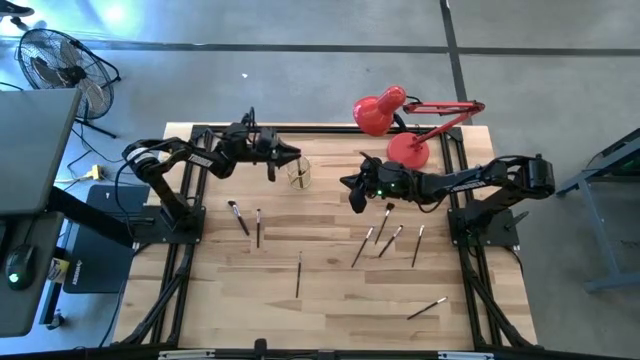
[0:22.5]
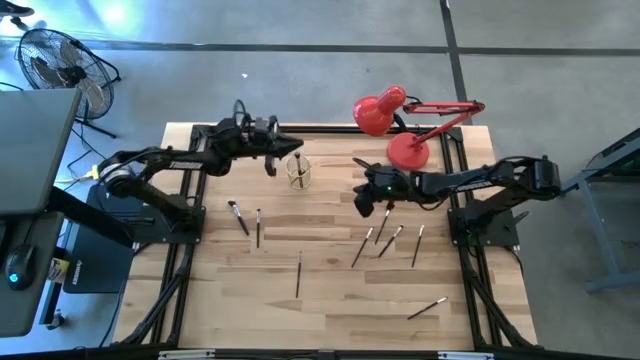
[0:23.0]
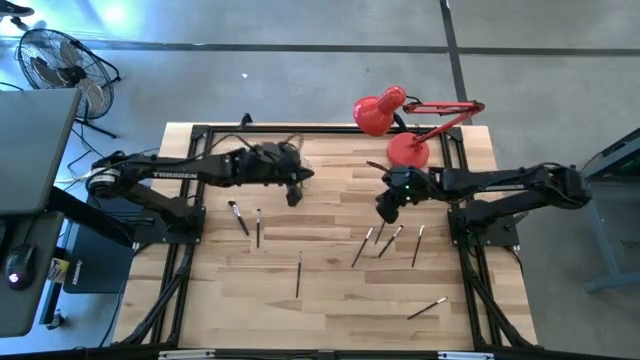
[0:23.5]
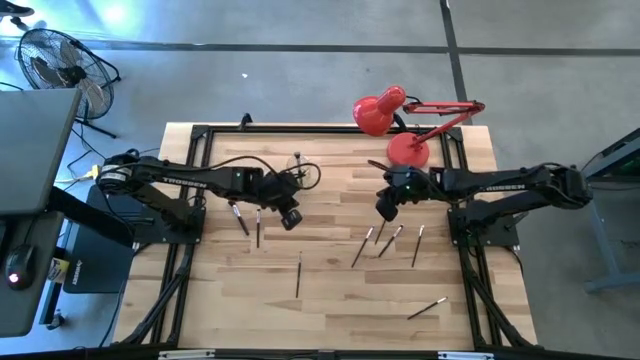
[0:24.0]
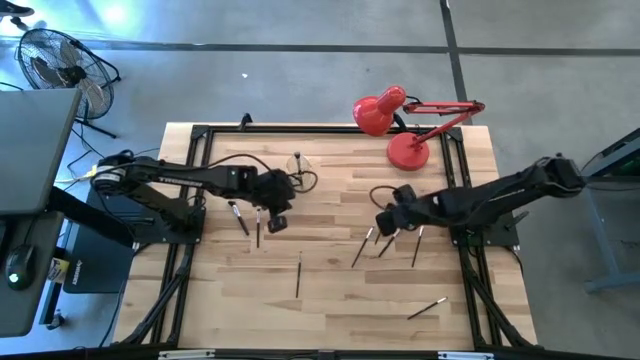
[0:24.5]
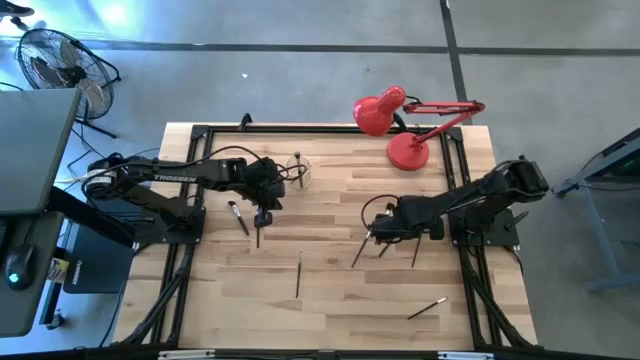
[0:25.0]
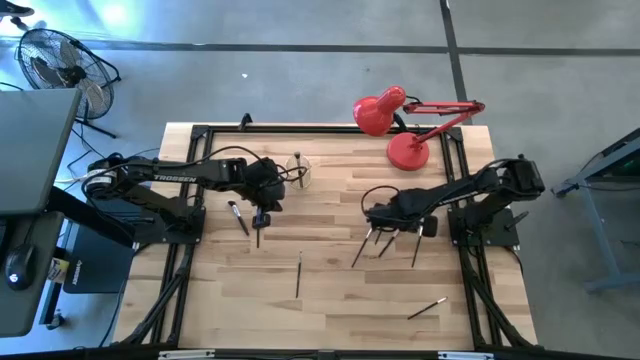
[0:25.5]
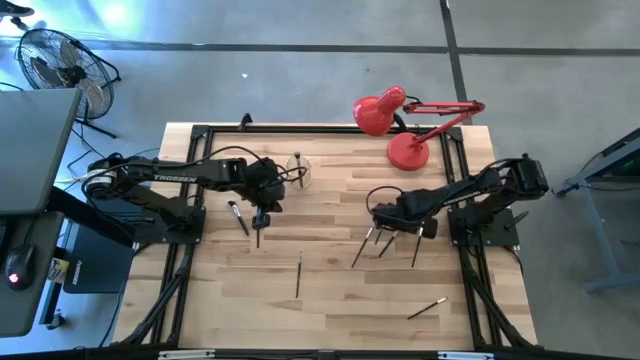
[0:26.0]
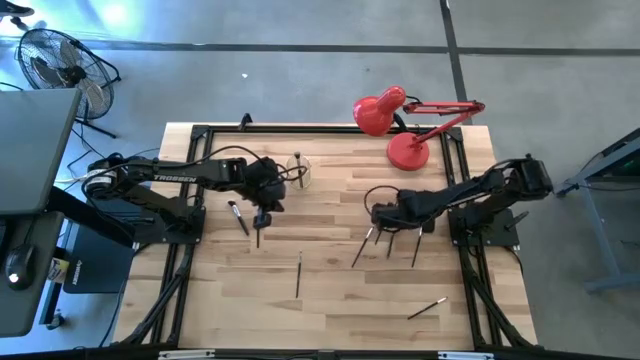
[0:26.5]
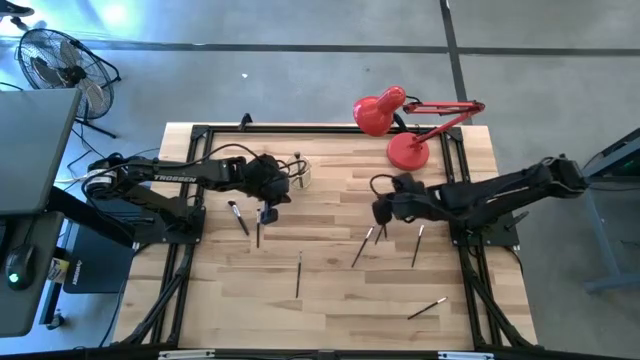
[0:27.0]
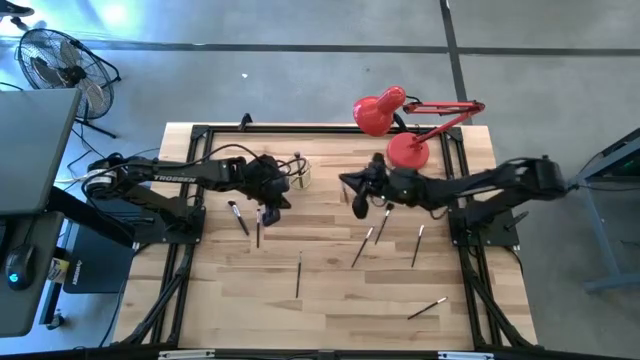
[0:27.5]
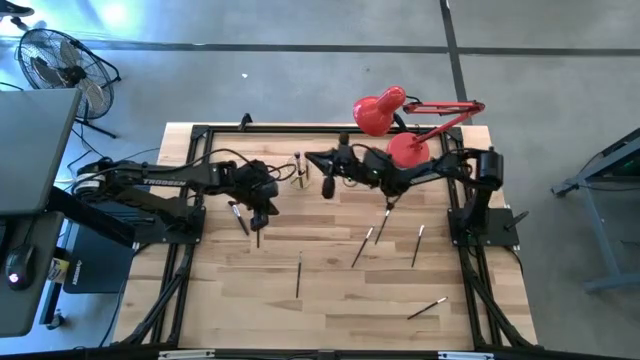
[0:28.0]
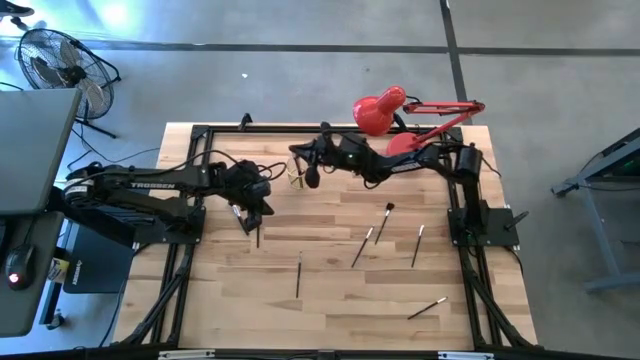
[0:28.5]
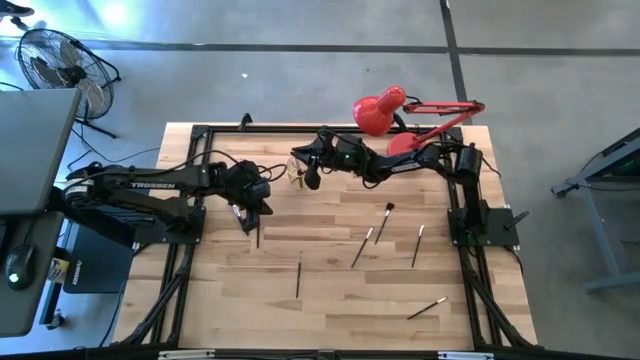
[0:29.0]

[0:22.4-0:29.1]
Task: Put items in baskets/containers
Put the eyeshadow brush into the wire organizer

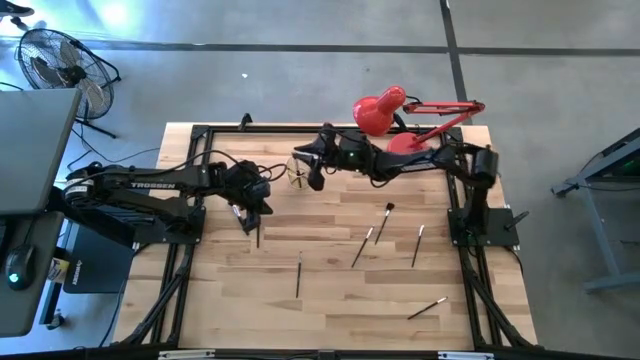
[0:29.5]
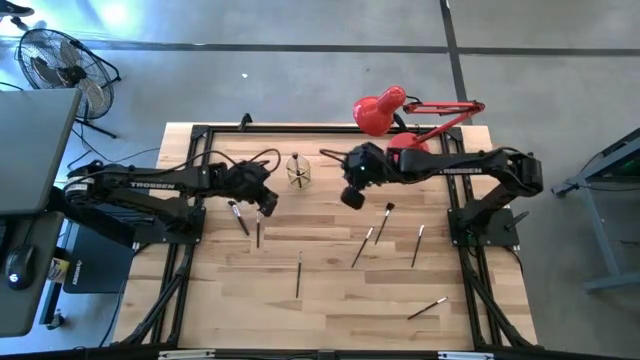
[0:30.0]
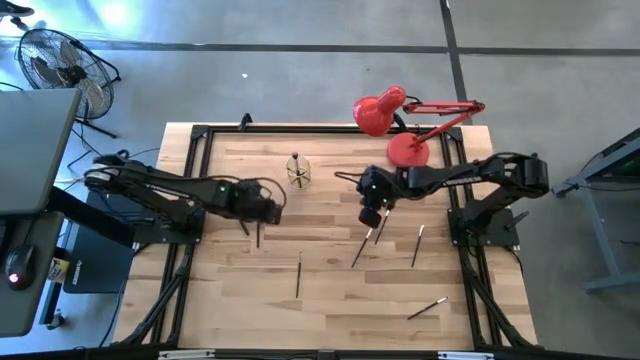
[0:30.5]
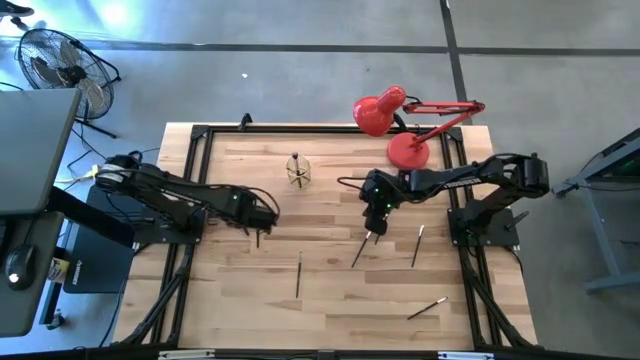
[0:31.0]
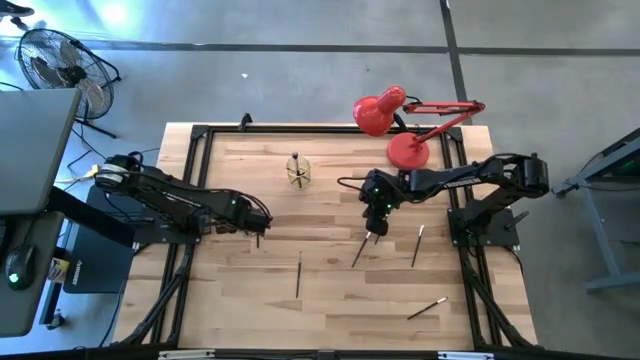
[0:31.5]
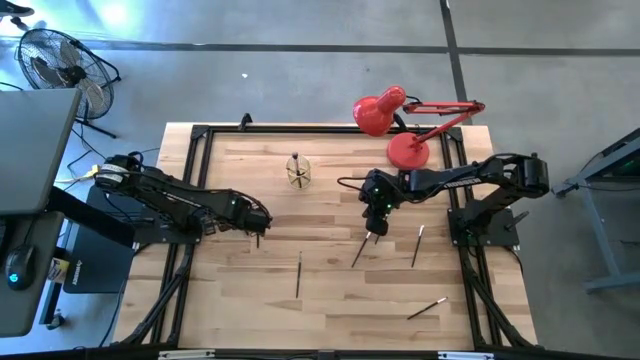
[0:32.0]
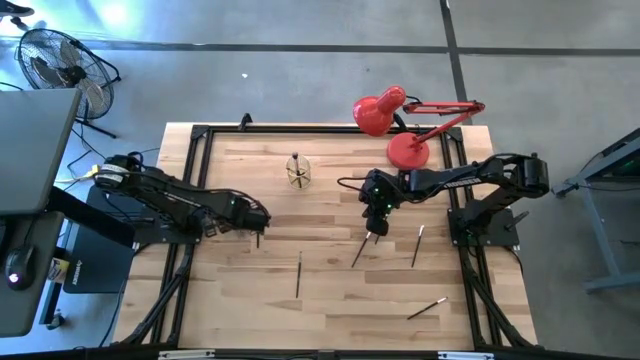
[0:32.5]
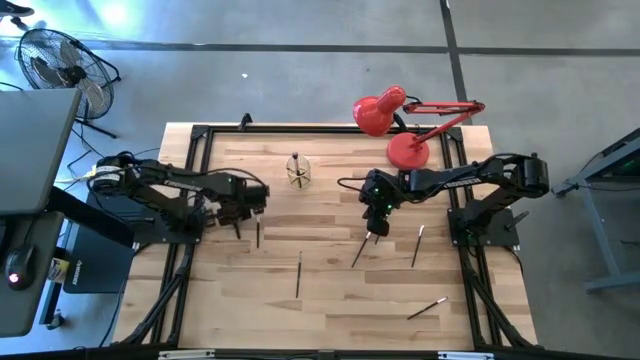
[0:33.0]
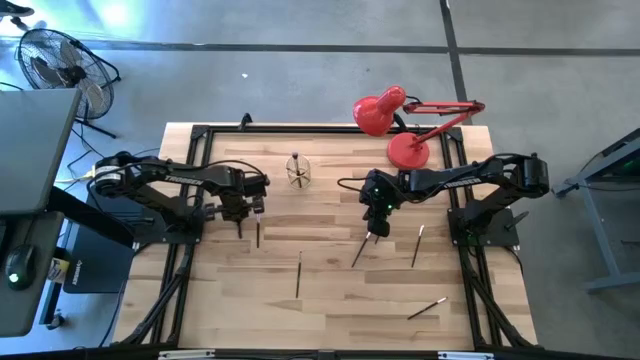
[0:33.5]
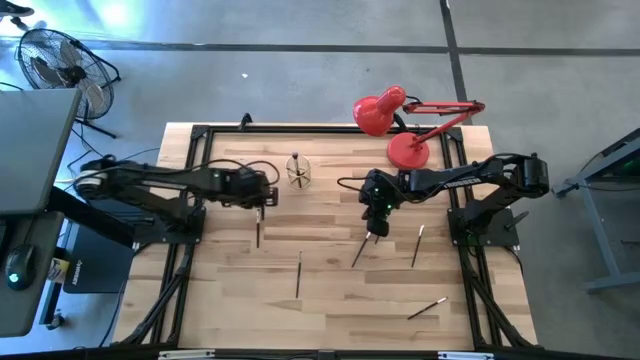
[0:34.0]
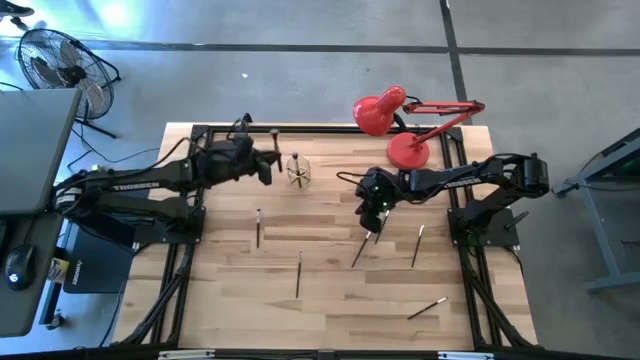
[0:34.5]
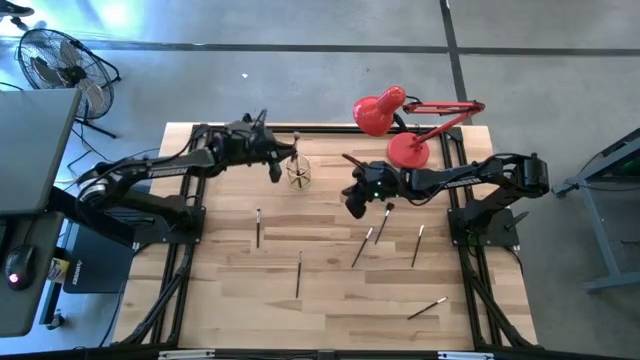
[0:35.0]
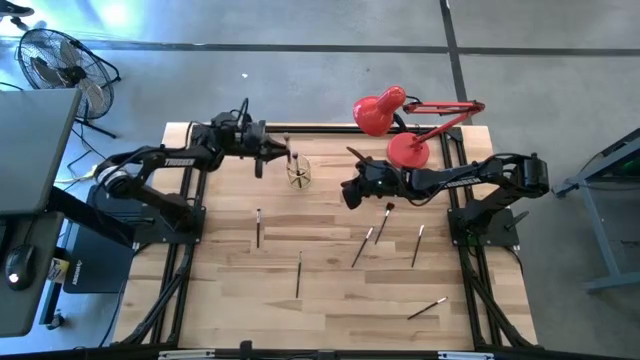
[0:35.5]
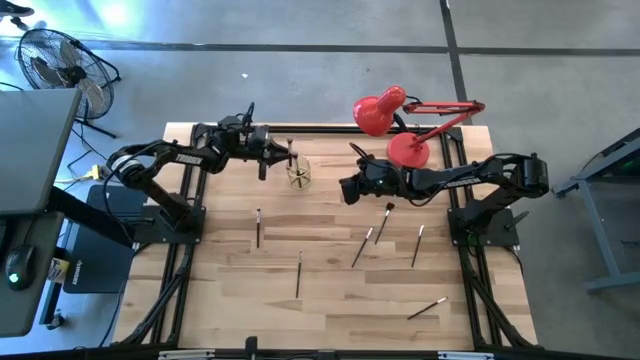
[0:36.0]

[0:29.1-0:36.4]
Put the powder brush into the wire organizer

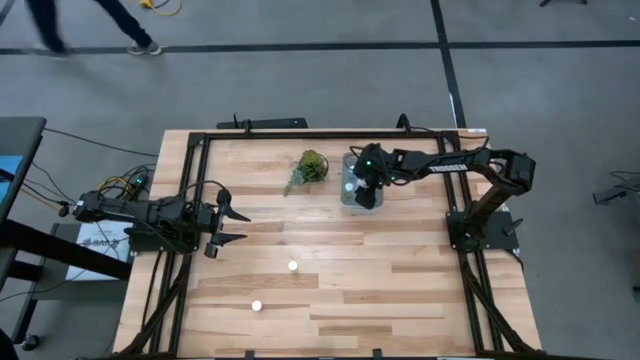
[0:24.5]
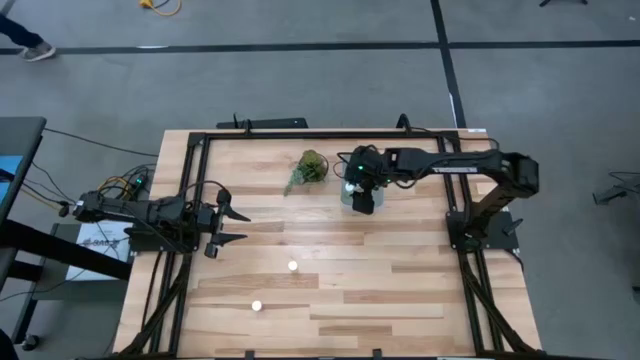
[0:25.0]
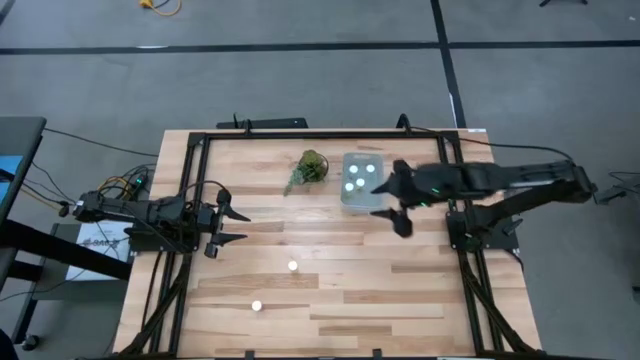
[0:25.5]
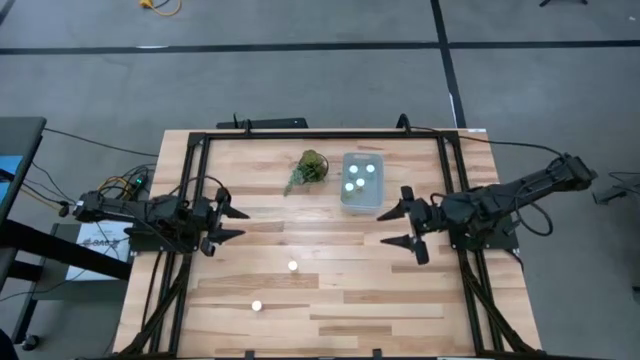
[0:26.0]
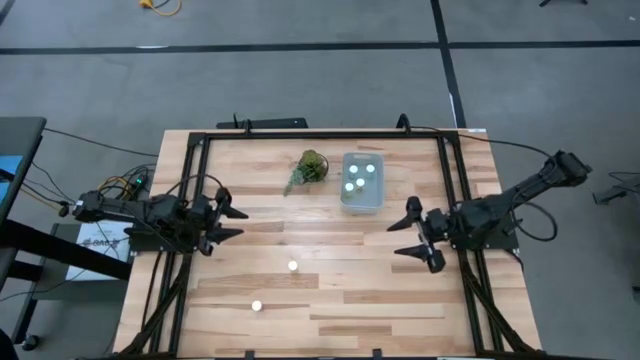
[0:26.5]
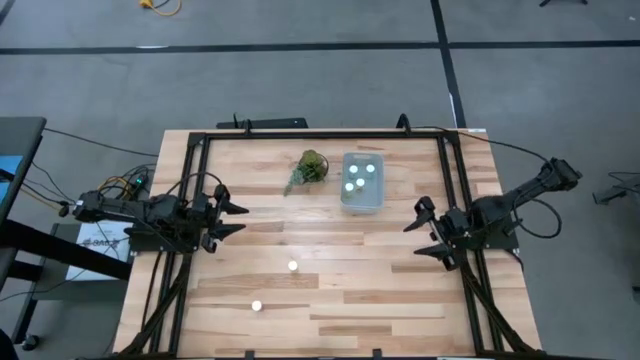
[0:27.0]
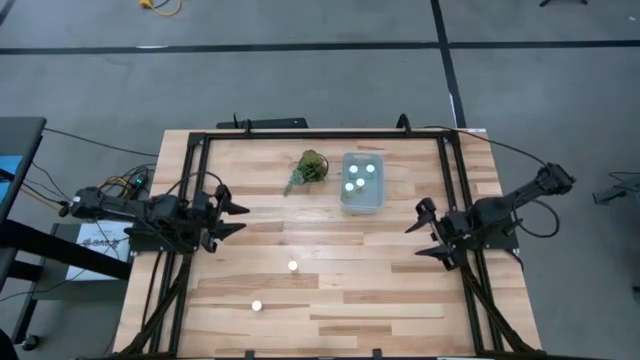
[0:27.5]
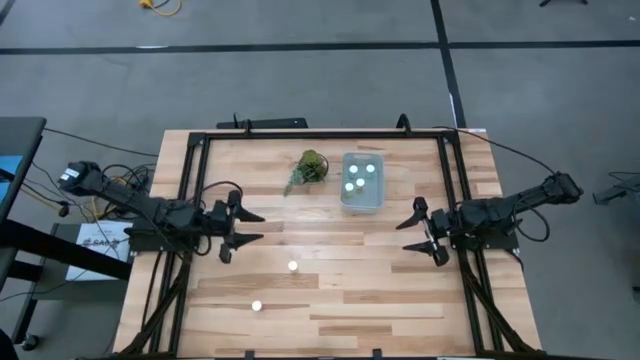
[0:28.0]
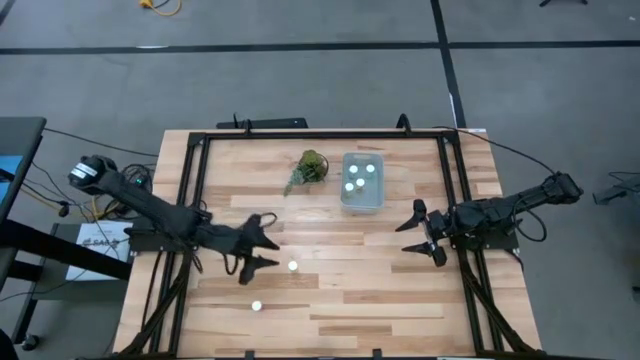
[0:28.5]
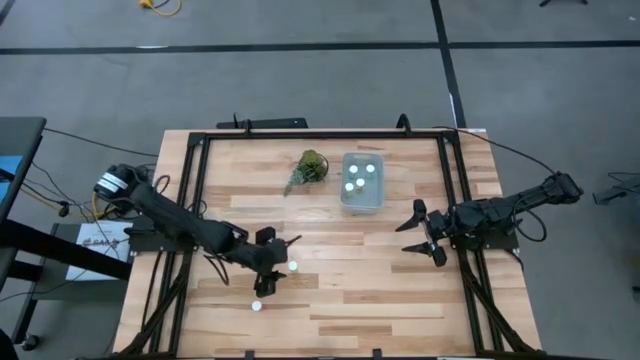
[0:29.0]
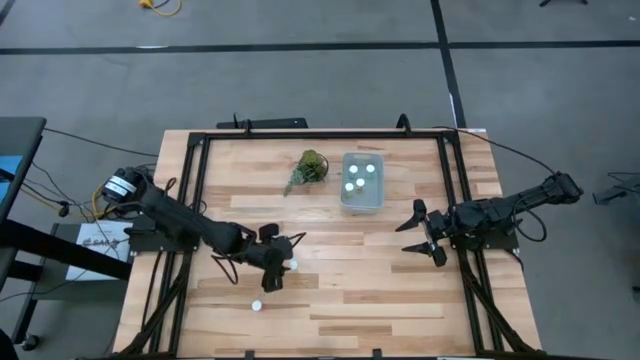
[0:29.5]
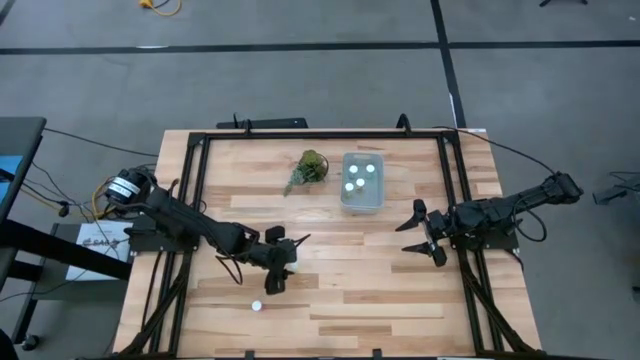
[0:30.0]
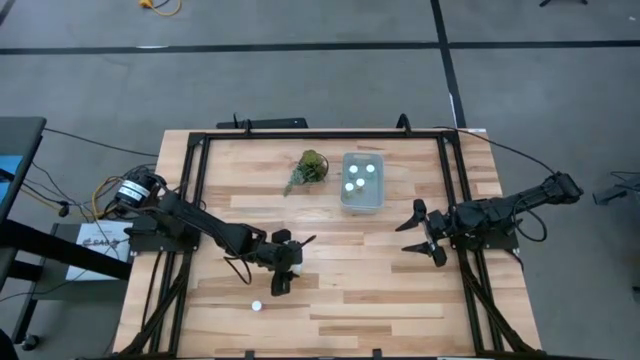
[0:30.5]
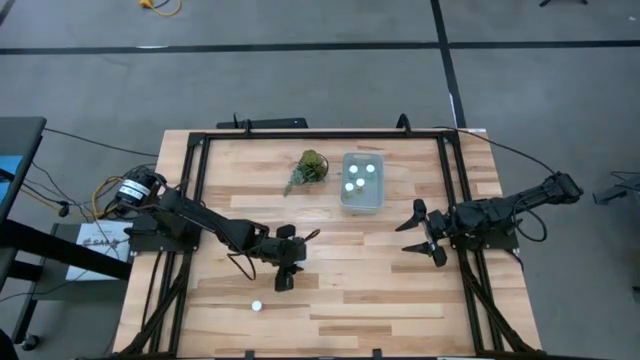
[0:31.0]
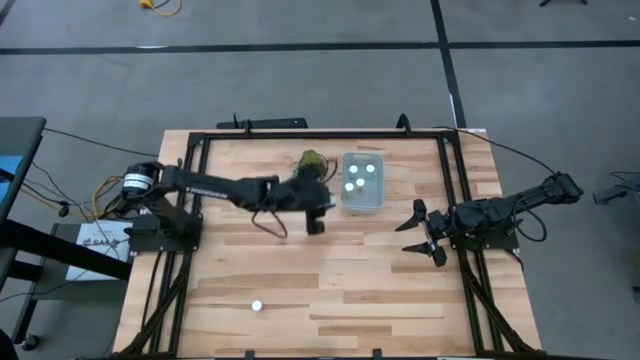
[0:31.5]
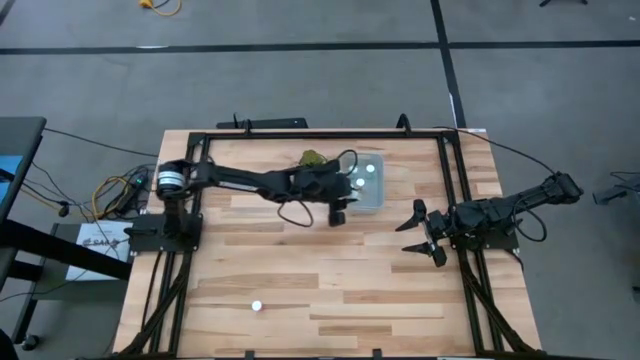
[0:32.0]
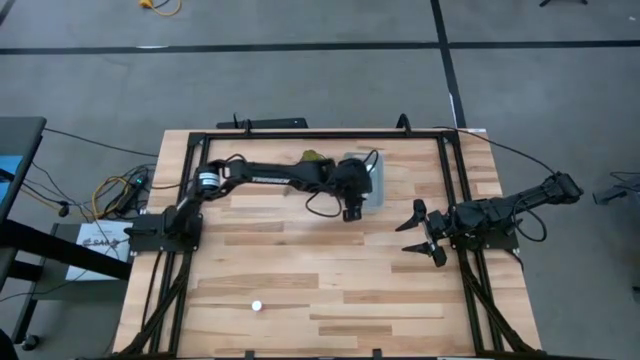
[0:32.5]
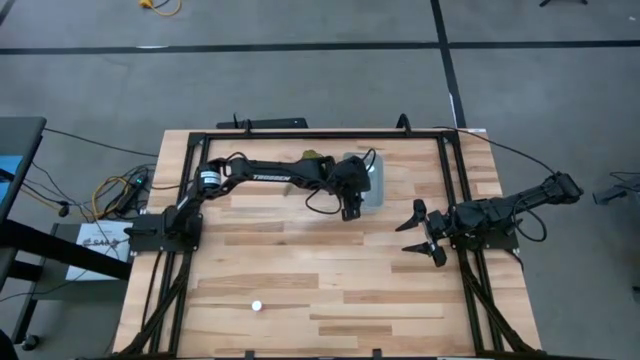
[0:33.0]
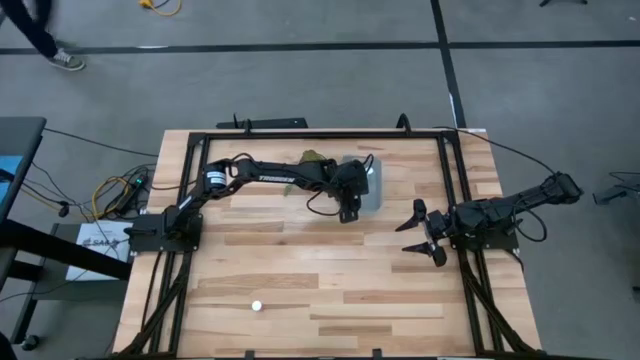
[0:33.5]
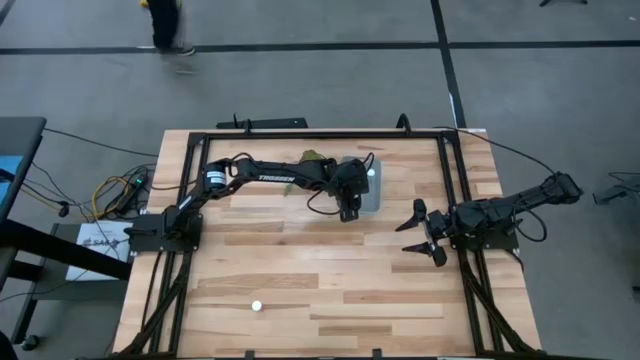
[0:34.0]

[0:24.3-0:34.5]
Task: Pick and place pill bottles into a basket
Put the yellow pill bottle into the gray bin
